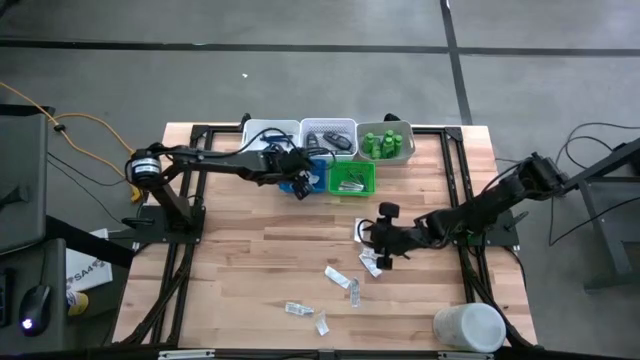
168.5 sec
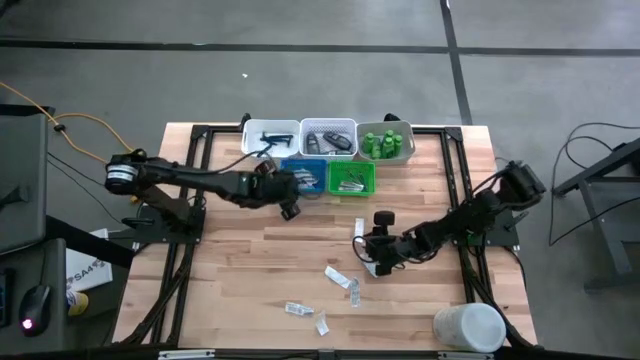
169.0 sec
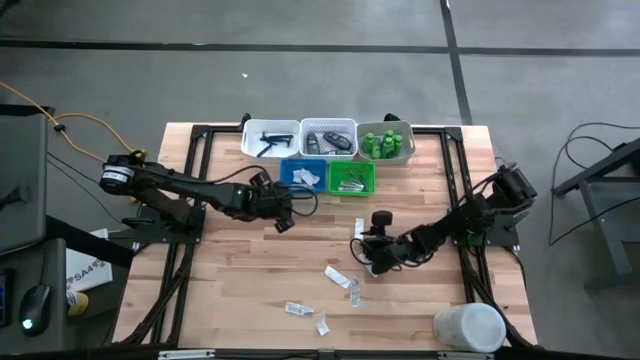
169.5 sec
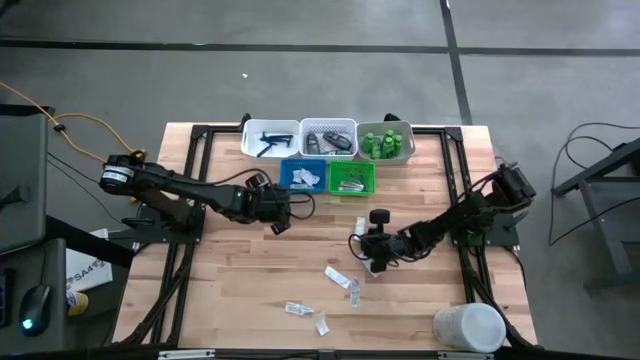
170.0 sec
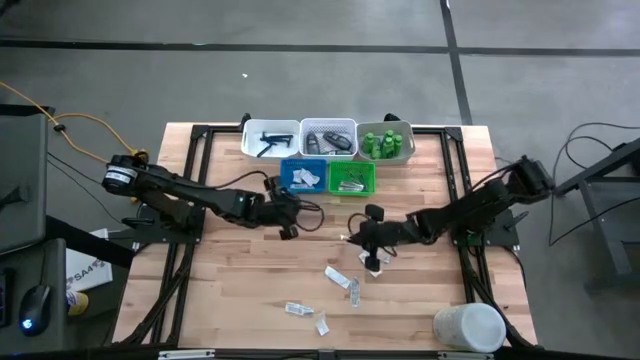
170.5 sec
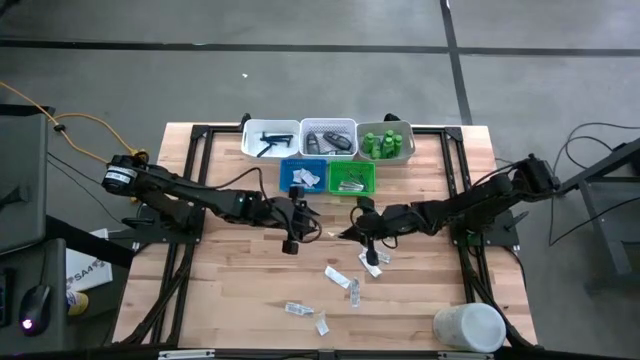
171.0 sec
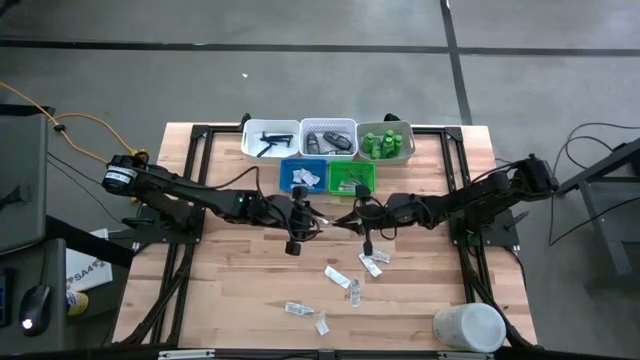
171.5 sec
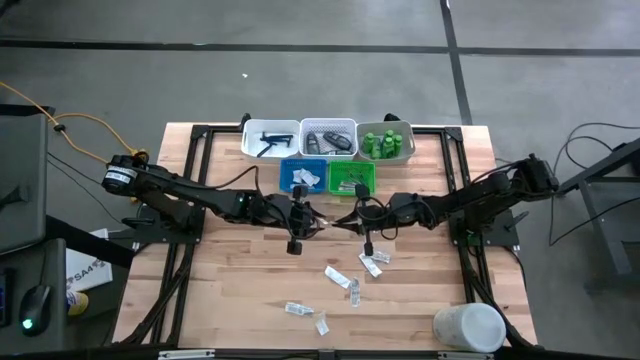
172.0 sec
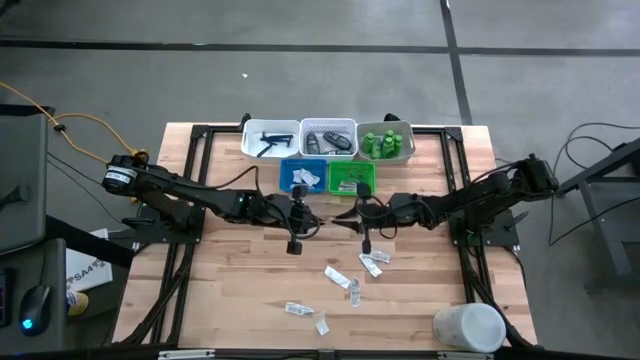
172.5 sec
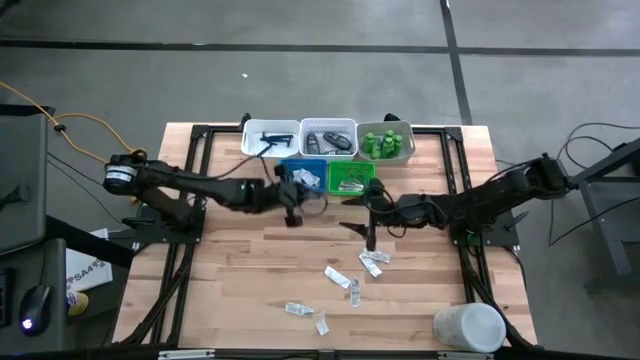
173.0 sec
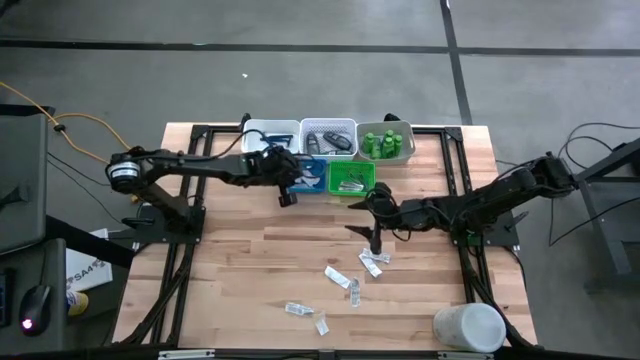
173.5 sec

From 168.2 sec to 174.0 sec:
Task: Pick & Place Travel size toiletries
Put the white bandage pad into the blue basket

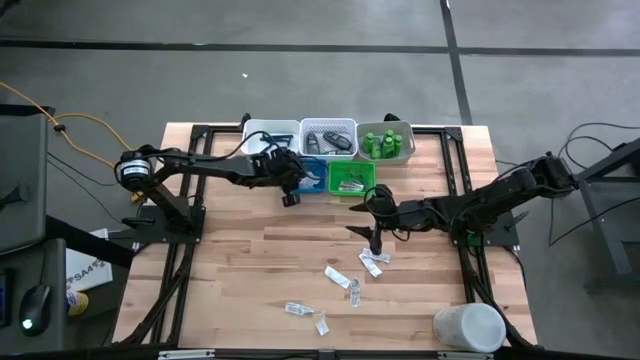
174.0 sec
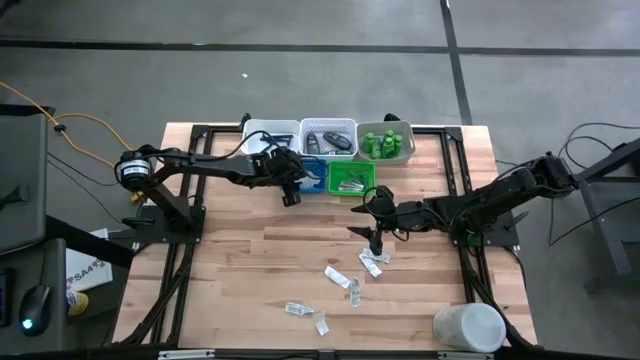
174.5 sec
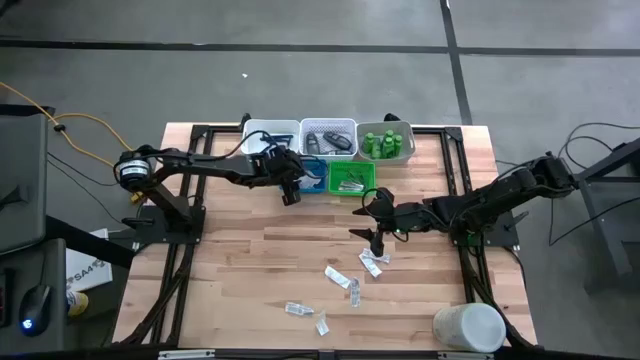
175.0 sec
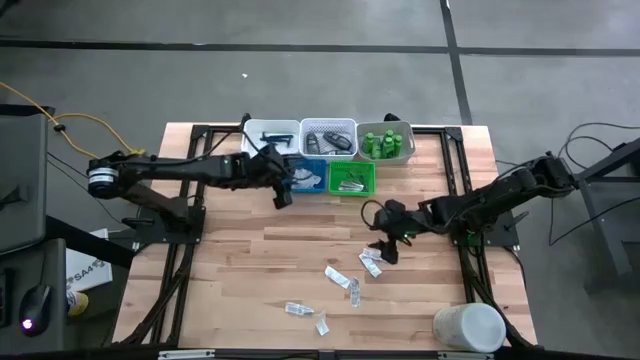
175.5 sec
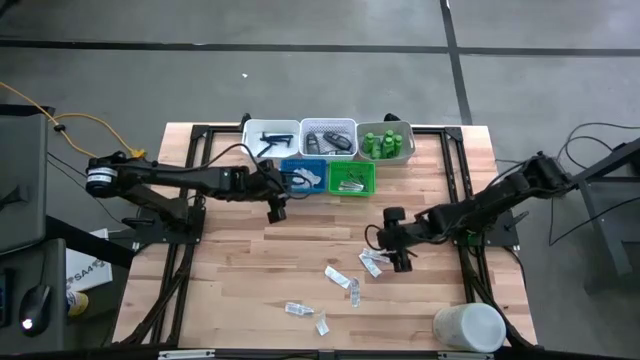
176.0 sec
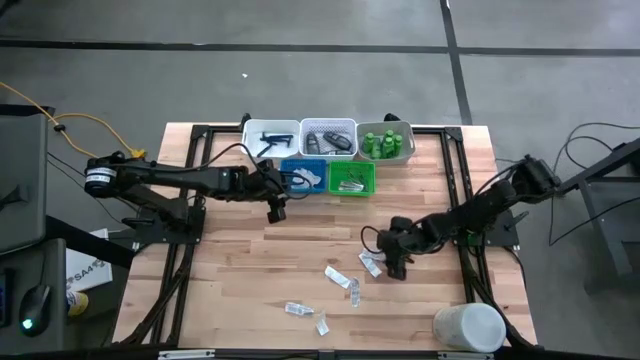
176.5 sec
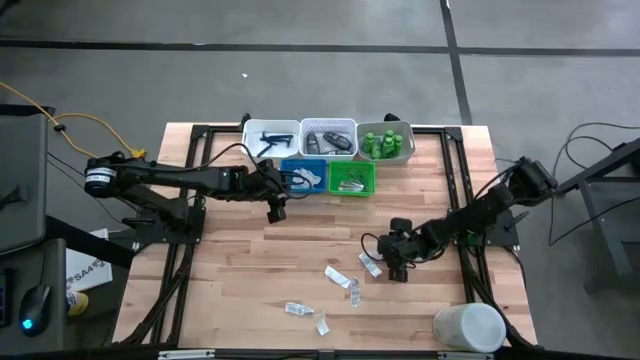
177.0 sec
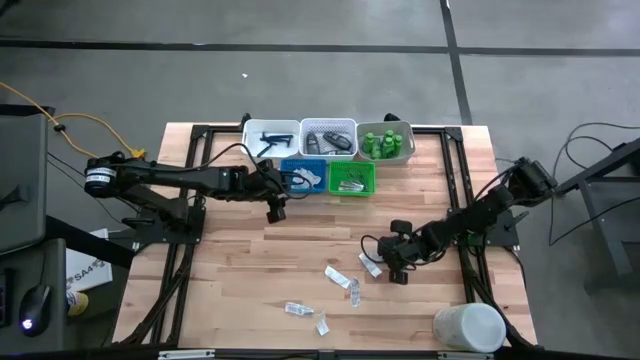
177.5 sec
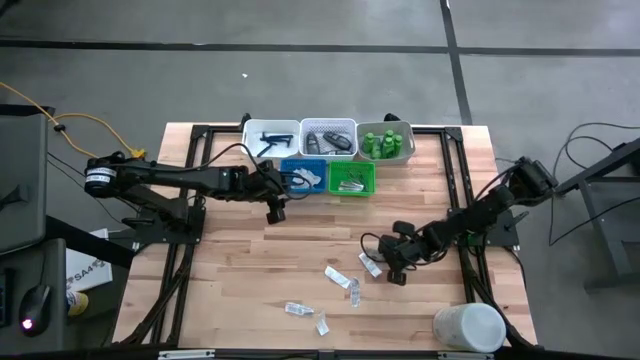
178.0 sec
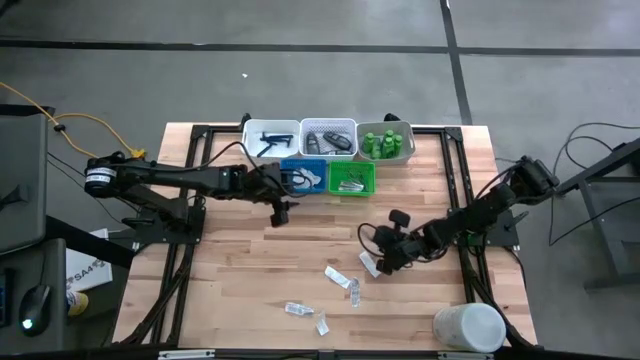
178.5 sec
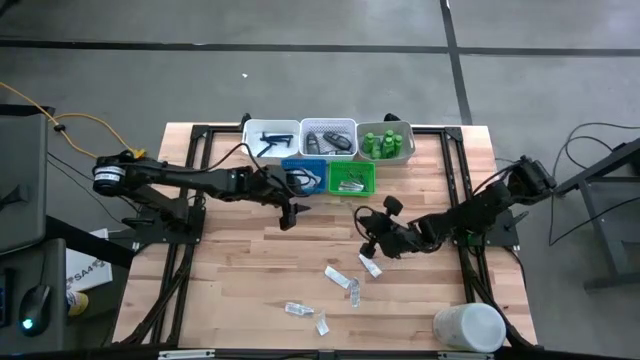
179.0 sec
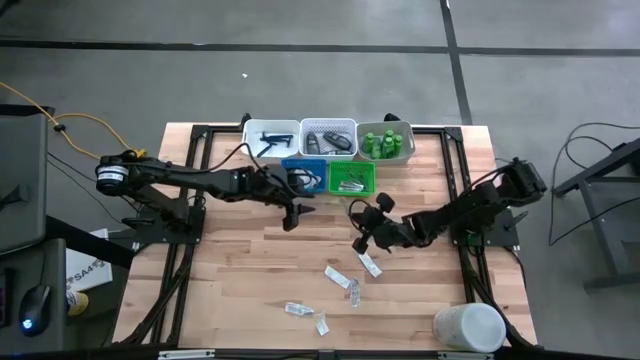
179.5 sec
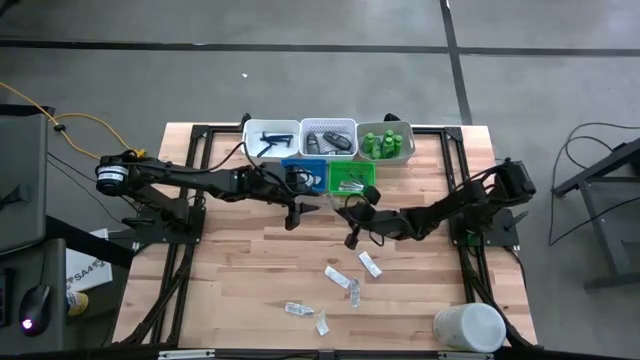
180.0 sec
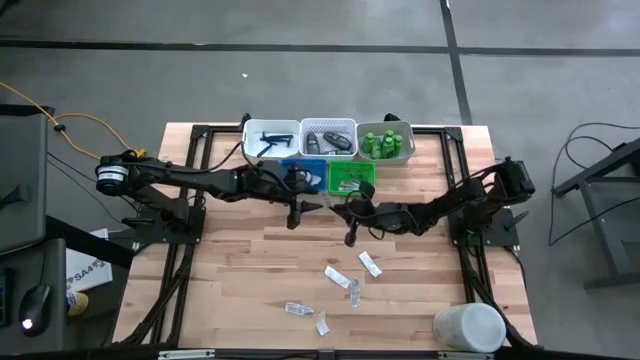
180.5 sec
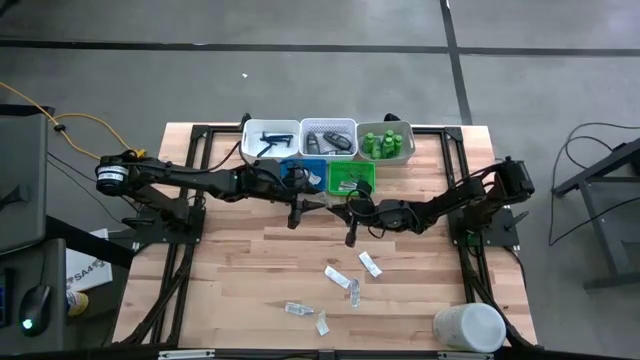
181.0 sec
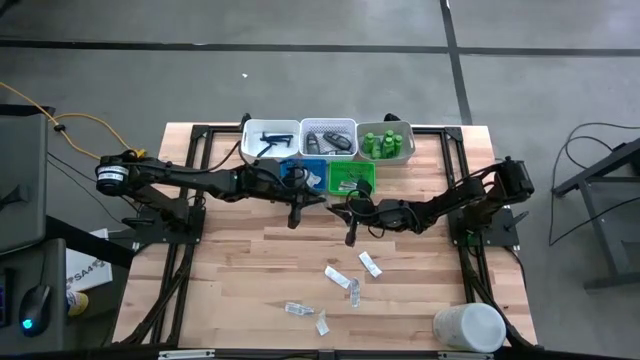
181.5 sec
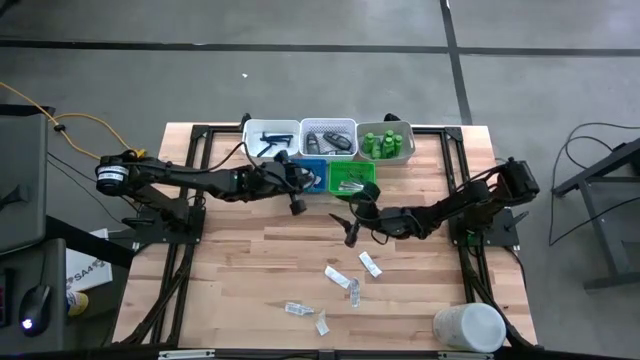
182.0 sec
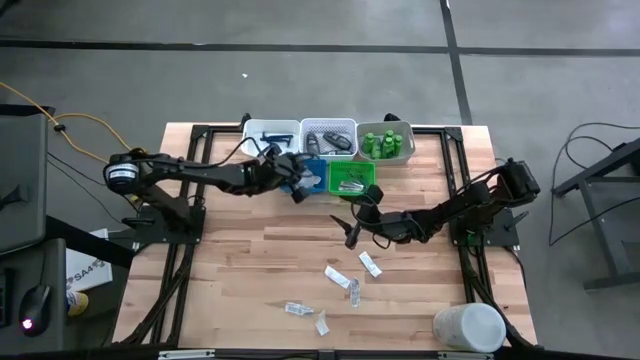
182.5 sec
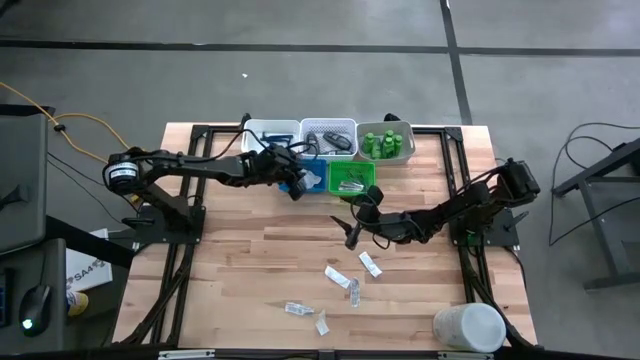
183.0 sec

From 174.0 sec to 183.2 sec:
Put the white bandage pad into the blue basket

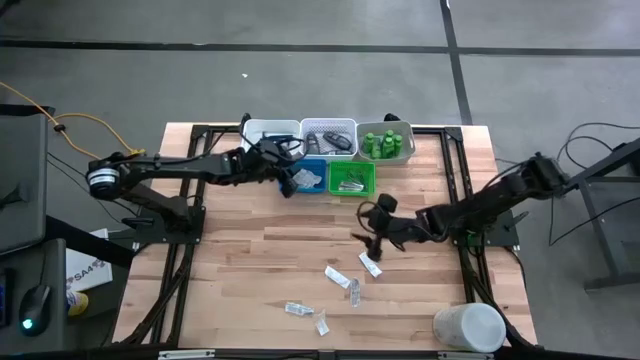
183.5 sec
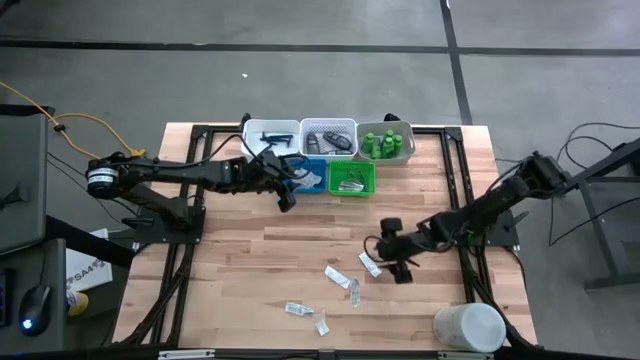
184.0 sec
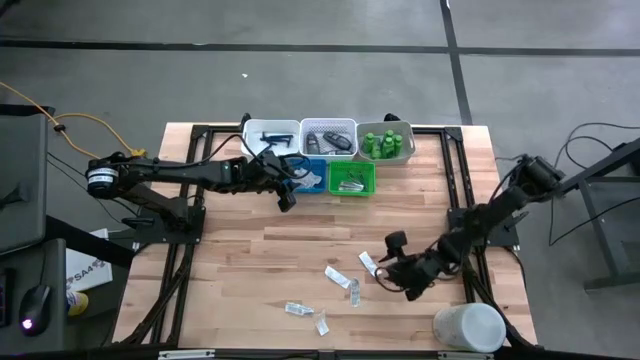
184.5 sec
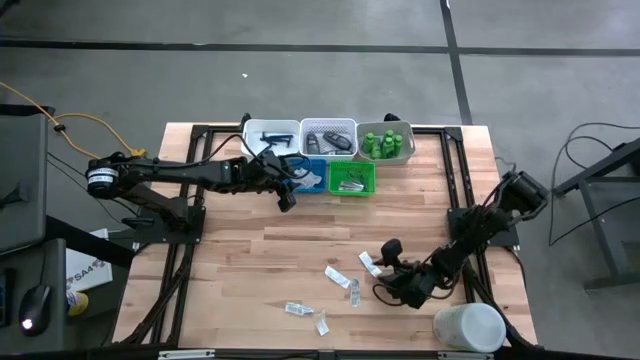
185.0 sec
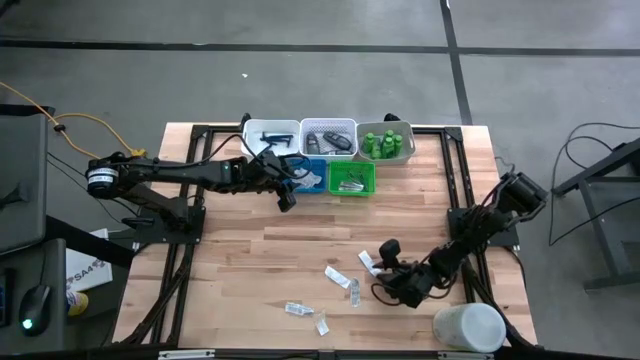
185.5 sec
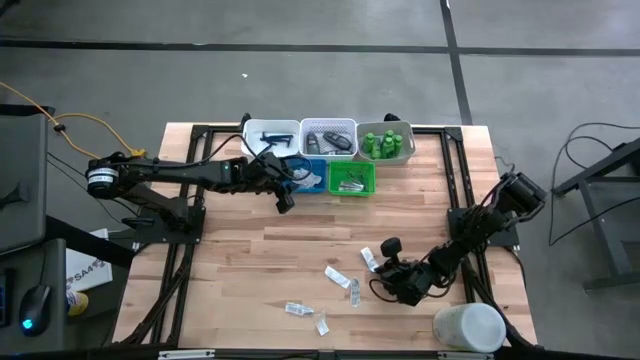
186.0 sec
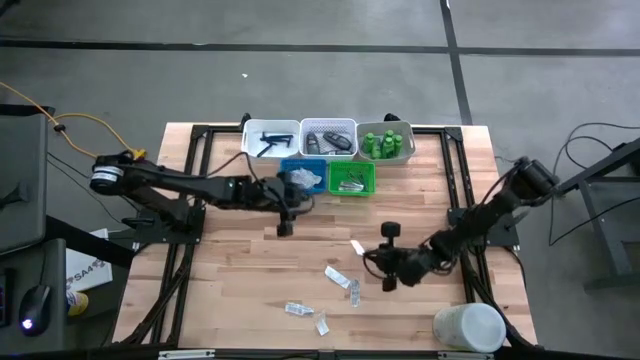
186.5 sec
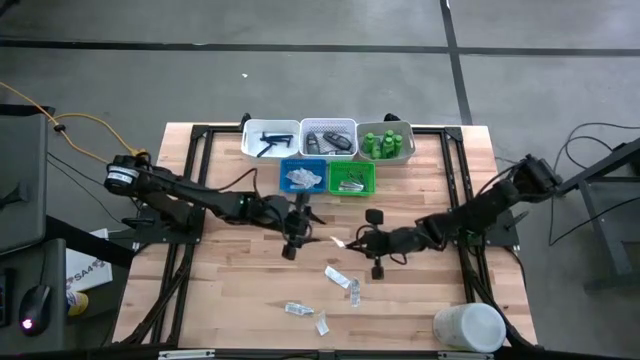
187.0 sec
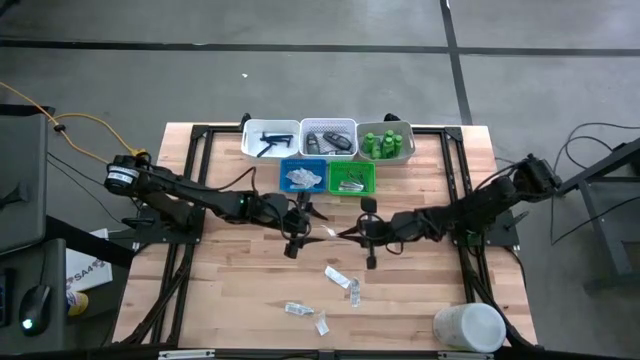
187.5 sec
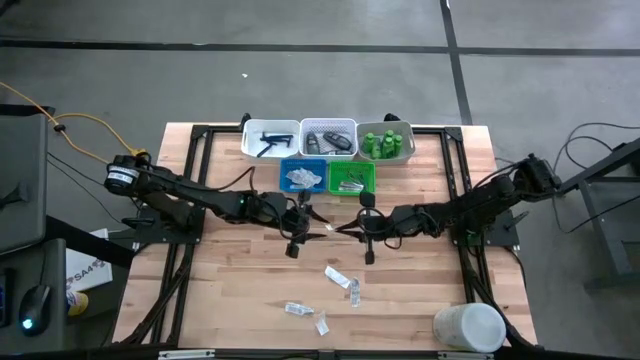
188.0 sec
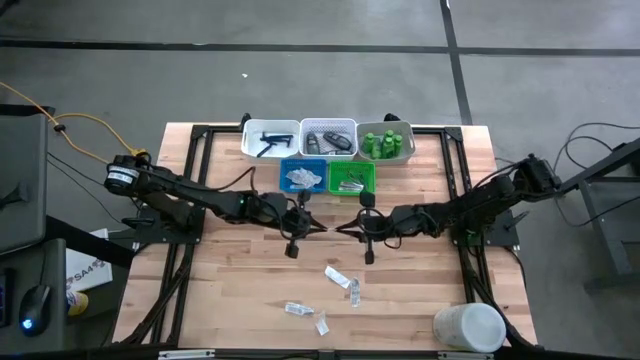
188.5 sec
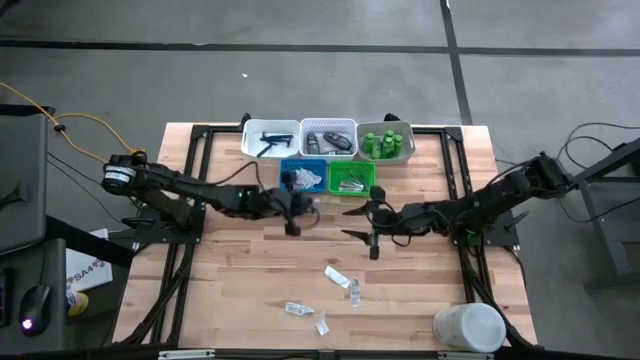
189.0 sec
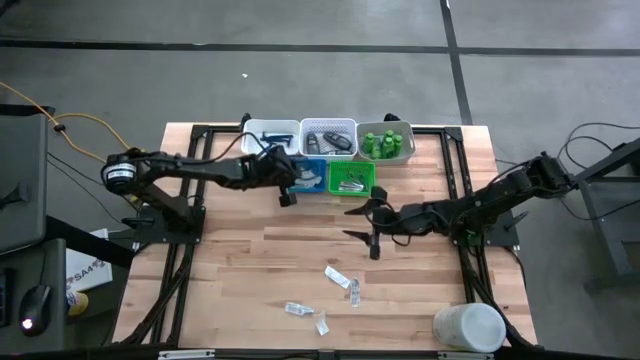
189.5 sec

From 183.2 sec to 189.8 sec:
Put the white bandage pad into the blue basket
